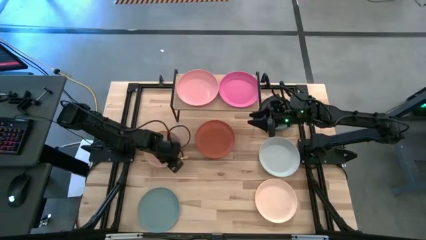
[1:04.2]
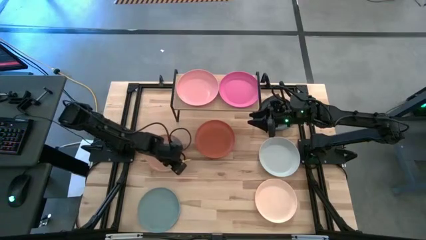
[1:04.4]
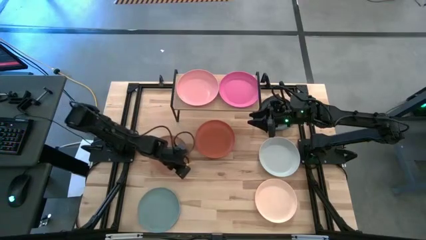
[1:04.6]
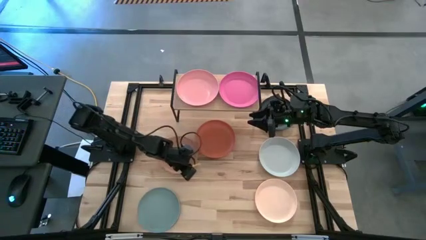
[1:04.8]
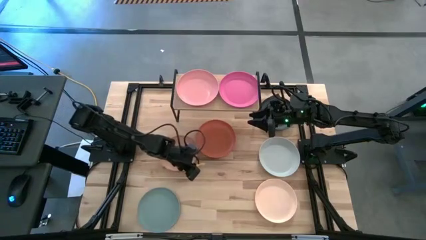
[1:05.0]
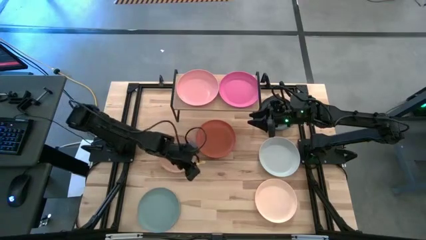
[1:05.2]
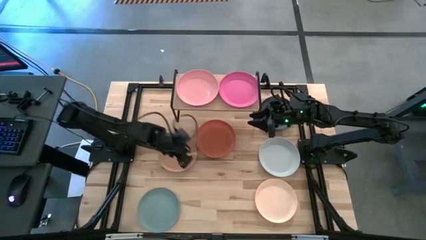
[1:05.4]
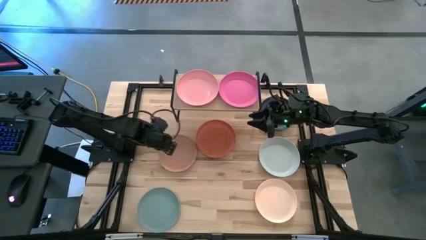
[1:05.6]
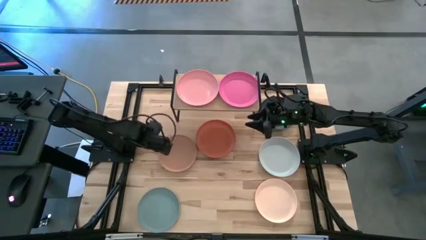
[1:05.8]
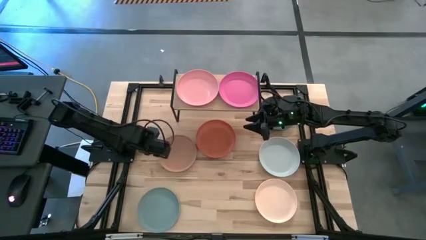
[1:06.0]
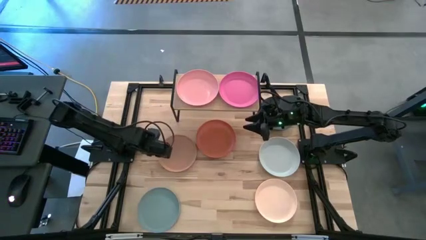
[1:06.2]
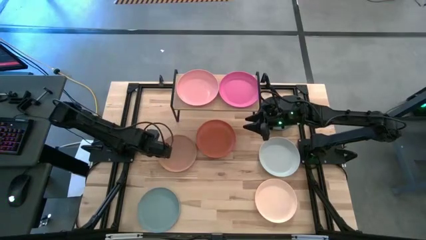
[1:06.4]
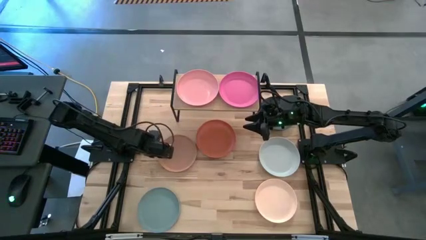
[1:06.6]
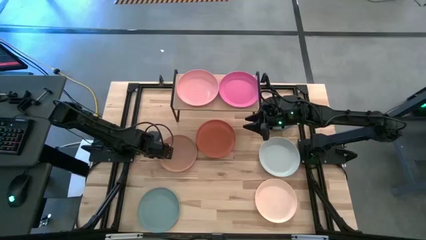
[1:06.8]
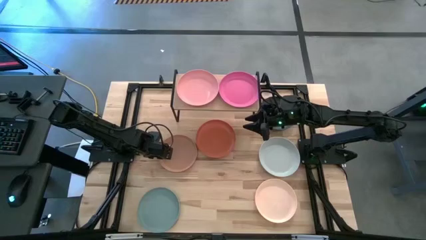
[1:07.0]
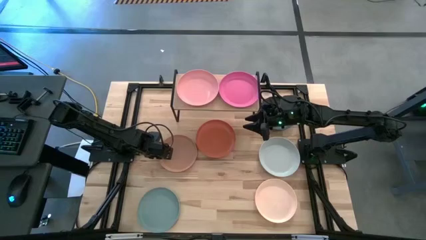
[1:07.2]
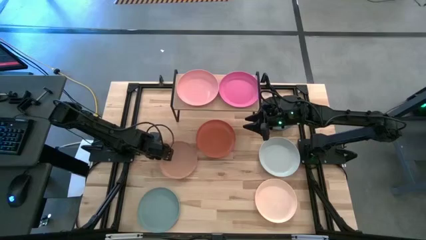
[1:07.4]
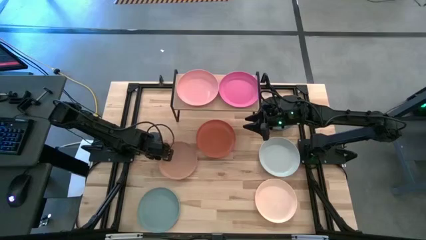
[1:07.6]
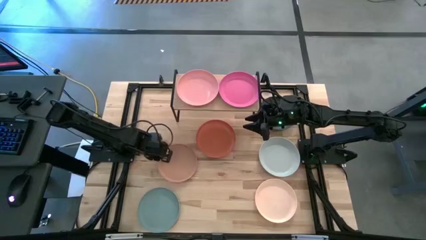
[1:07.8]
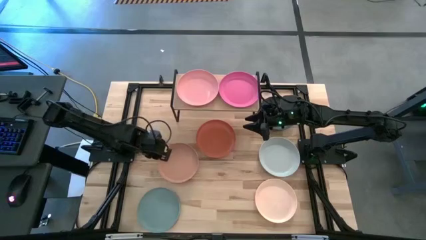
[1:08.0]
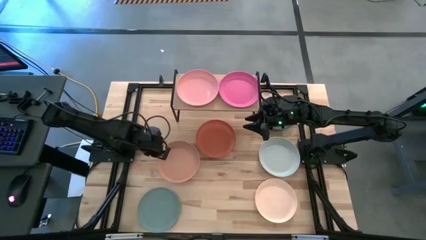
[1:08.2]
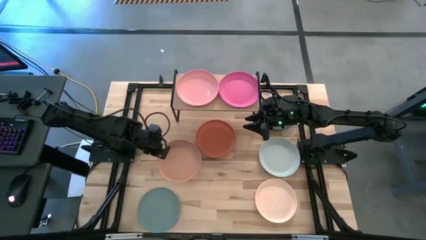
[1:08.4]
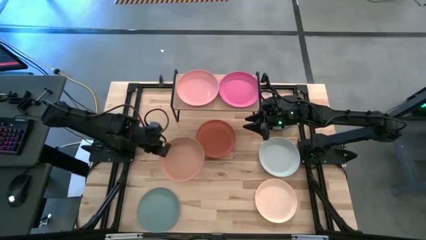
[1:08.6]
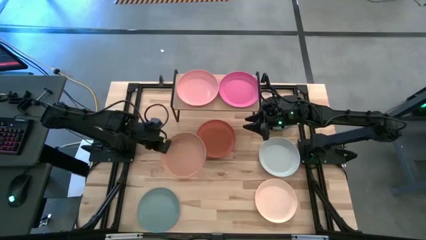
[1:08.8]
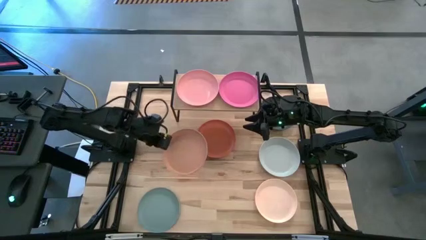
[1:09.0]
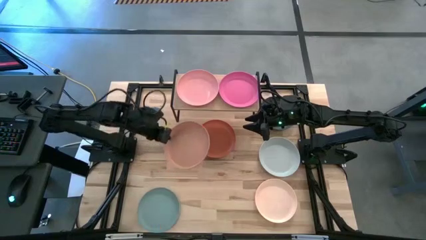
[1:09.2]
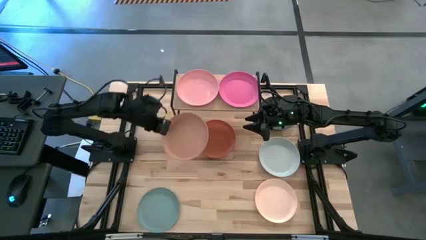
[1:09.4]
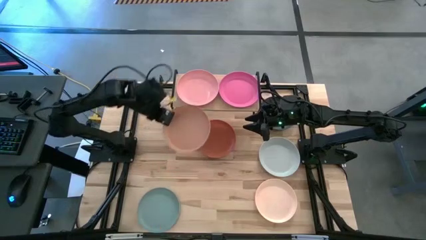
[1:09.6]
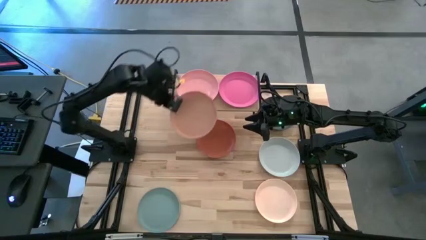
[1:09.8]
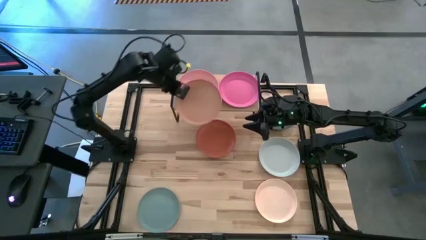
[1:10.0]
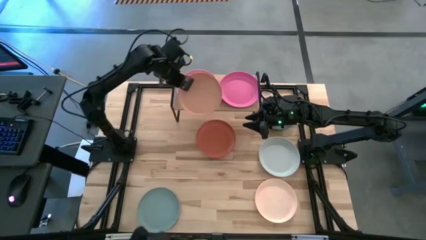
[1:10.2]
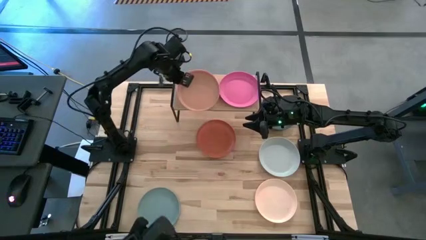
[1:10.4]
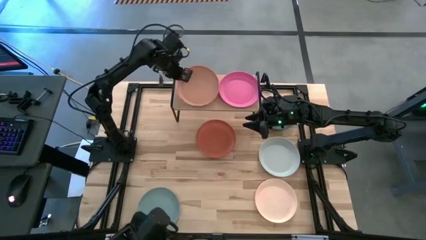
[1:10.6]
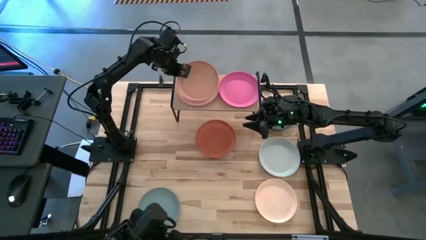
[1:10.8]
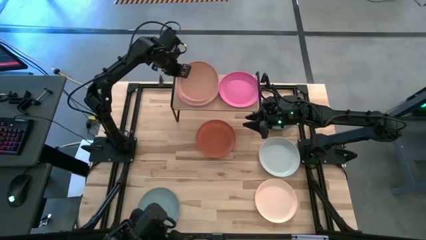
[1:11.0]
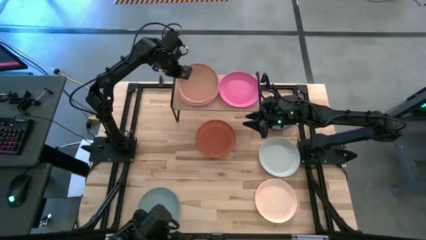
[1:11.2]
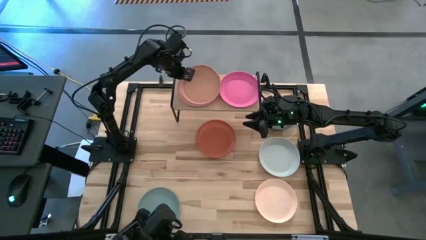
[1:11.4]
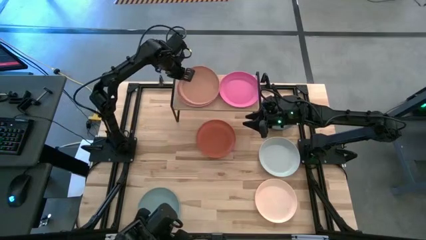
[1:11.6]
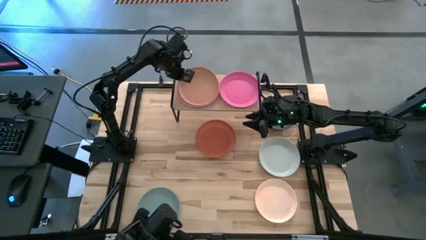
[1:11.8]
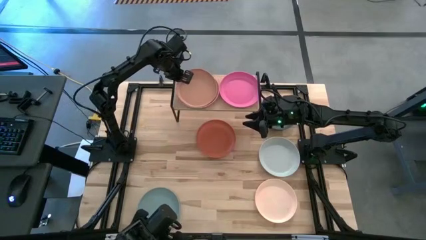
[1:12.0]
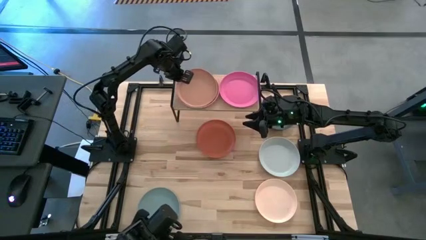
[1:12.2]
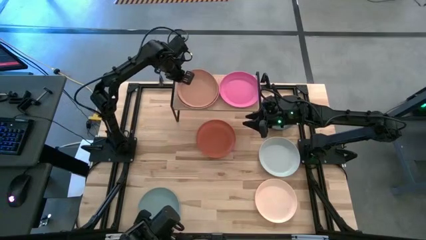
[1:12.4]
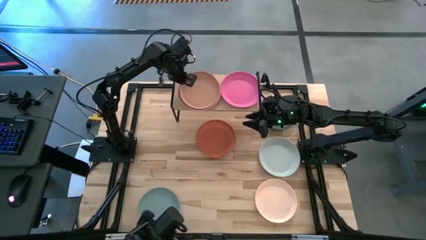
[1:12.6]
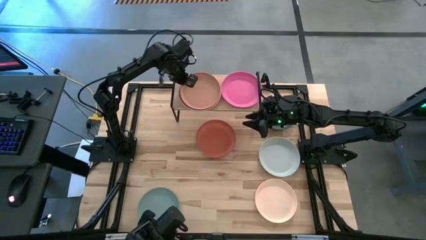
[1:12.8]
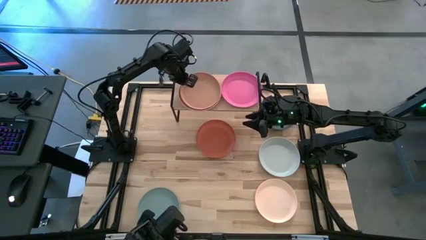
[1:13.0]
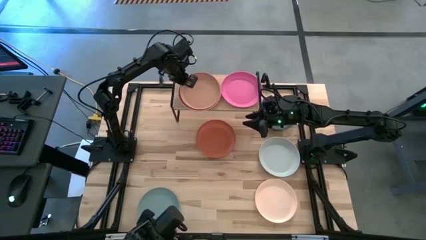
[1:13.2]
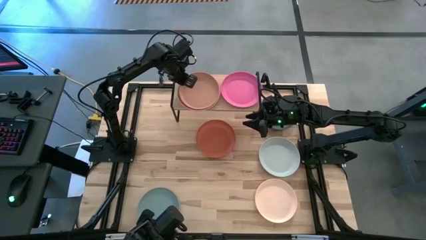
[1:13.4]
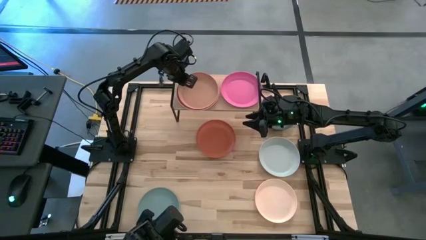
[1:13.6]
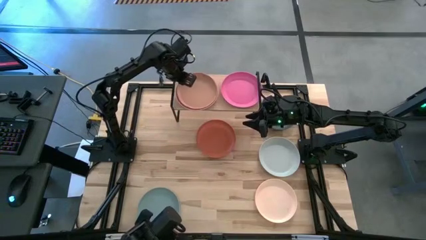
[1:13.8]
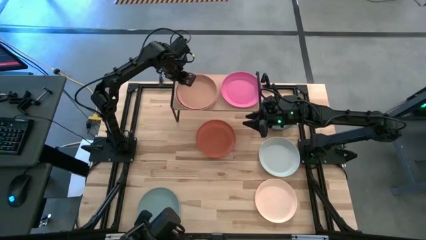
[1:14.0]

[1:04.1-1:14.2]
Task: Place and stack plates onto a shelf
Stack the light brown plate on top of the light pink plate

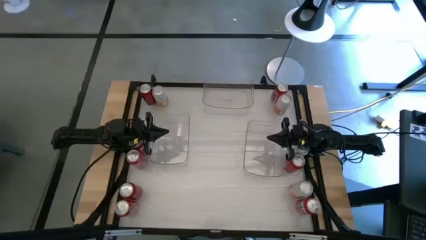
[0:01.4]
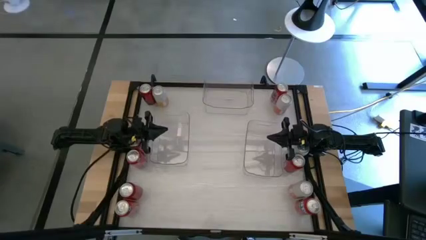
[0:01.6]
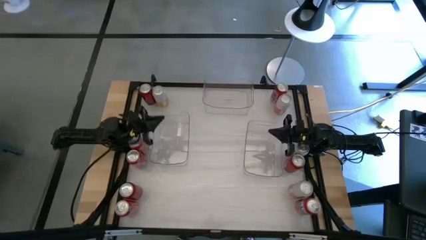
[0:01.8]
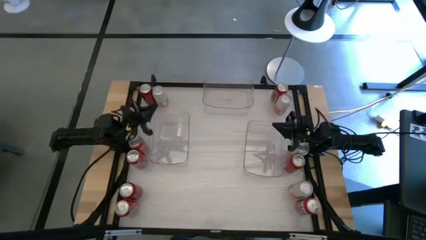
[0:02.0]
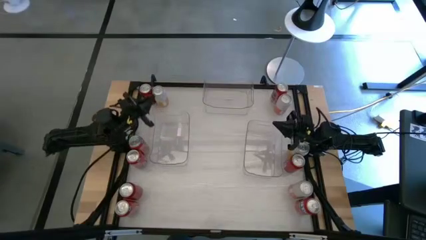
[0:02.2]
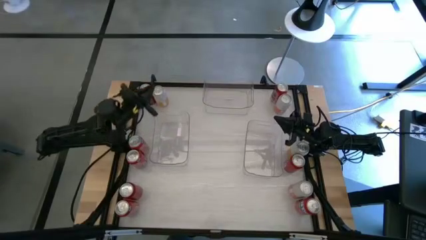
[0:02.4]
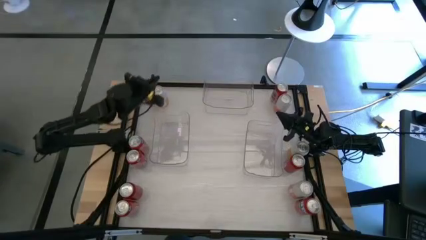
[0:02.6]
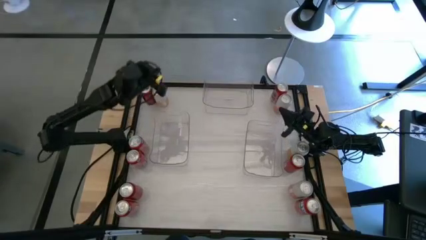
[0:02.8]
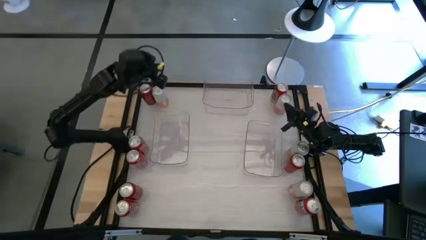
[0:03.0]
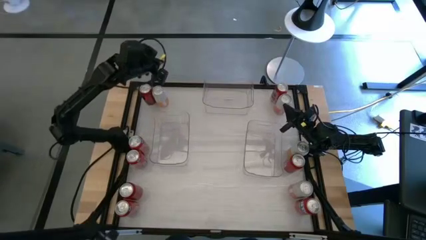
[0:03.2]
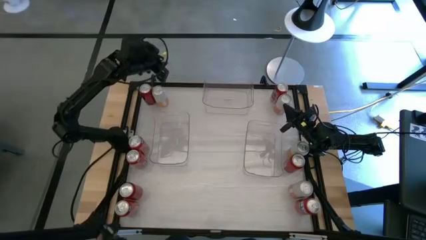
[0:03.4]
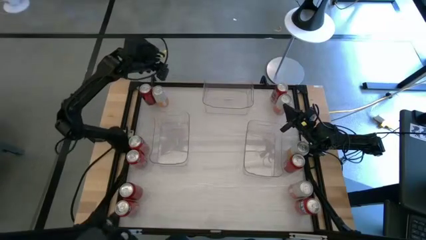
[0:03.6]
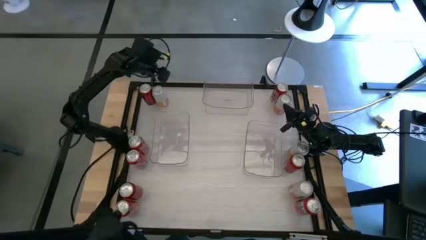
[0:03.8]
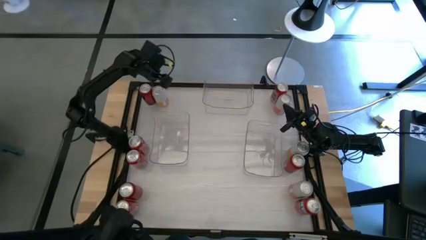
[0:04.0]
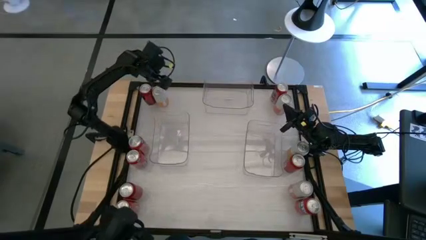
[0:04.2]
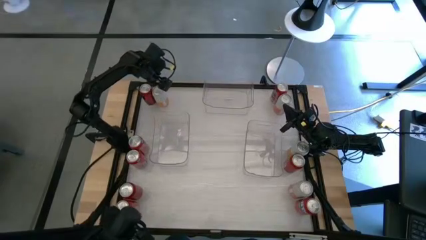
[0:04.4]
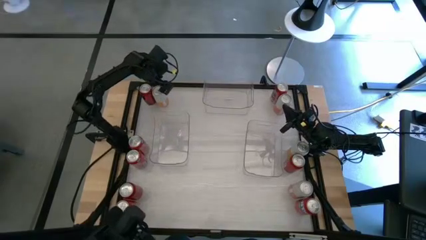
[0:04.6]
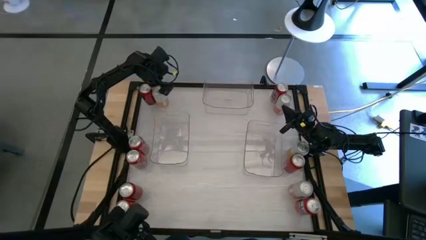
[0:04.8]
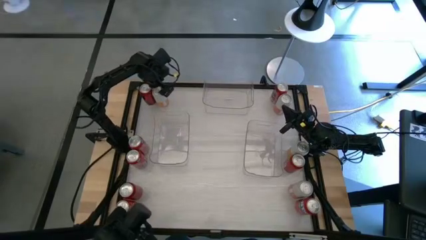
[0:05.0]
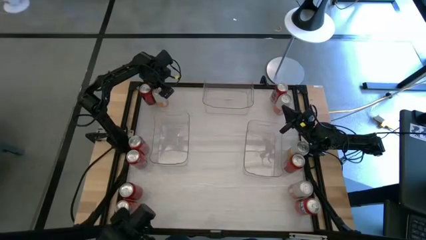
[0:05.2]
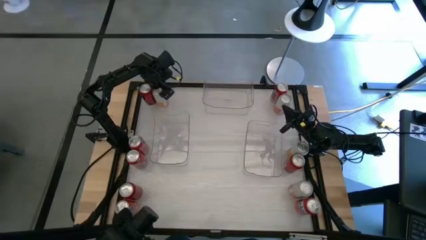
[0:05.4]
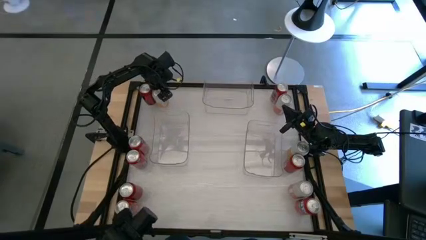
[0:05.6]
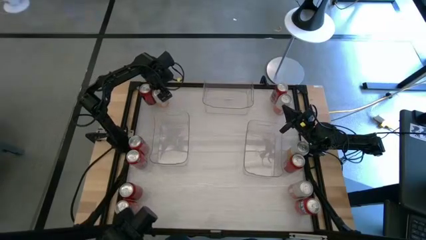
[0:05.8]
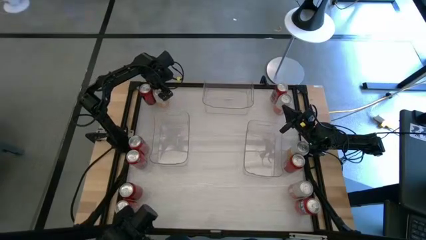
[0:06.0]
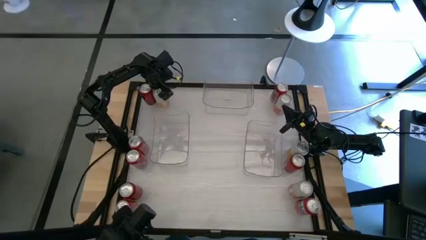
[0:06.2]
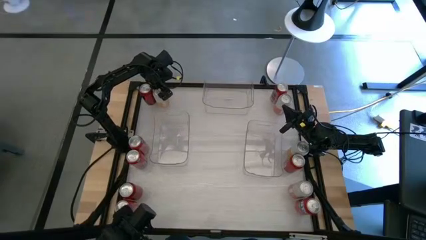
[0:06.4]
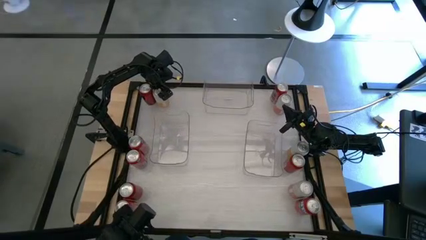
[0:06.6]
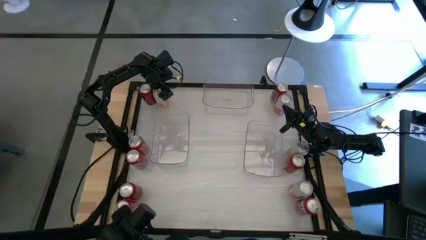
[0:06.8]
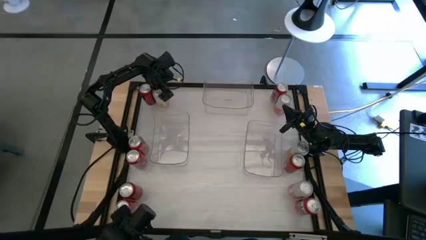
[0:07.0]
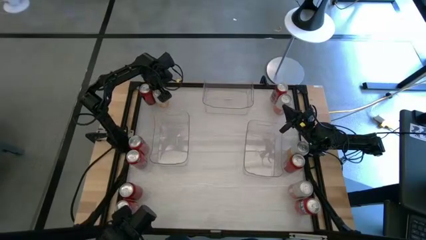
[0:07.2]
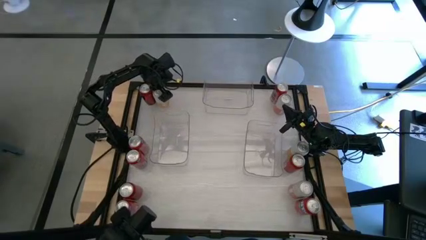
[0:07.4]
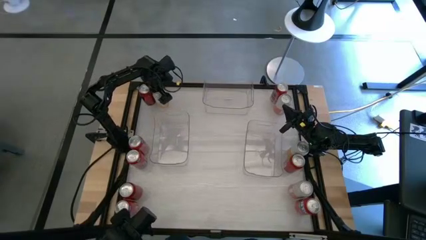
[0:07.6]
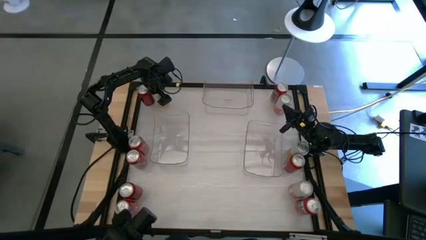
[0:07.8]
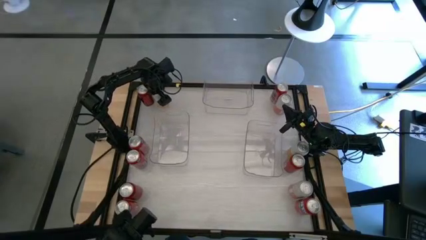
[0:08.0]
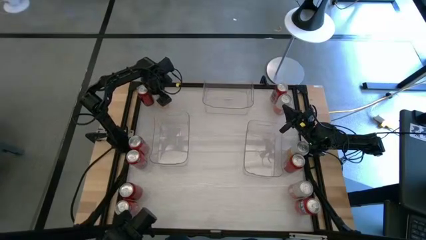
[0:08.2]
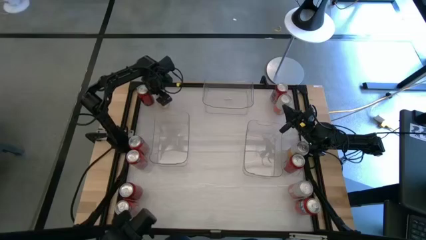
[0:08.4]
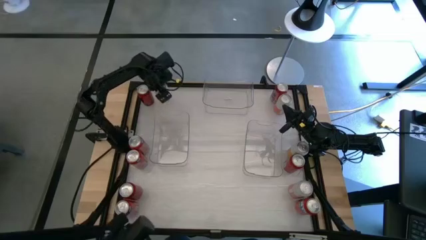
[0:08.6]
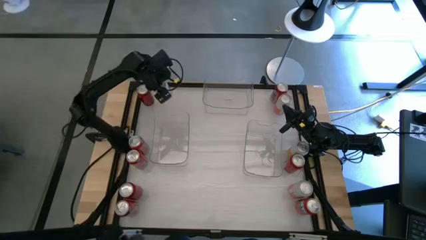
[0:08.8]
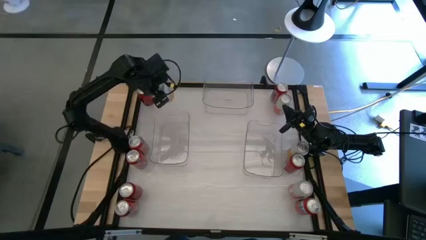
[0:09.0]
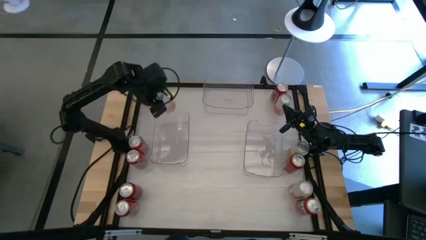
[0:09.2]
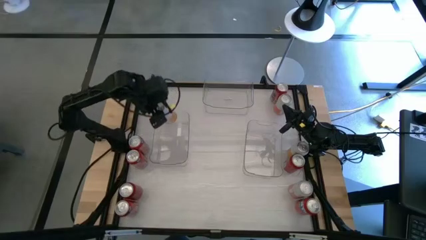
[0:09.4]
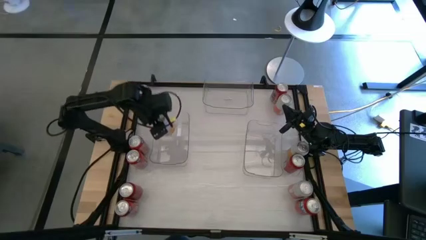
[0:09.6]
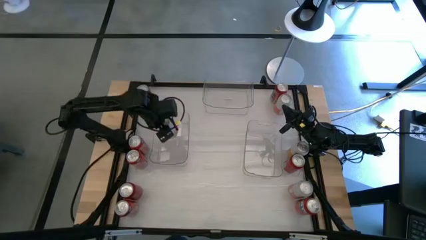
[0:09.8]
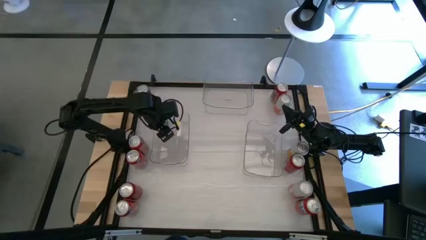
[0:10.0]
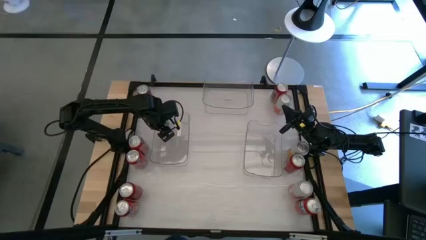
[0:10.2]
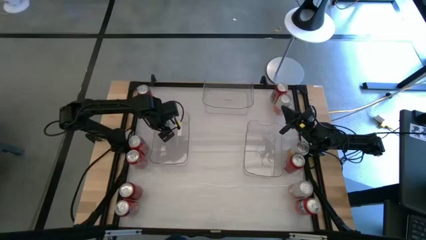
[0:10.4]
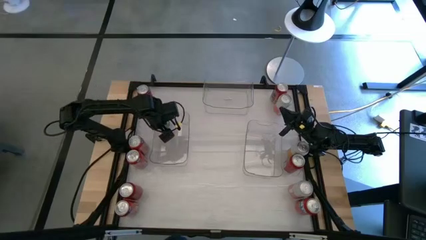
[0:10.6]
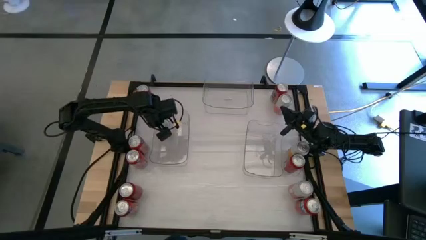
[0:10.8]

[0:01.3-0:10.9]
Task: Sort soda cans
Put the top left yellow white soda can into the left transparent bin
